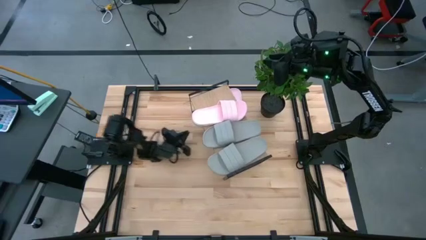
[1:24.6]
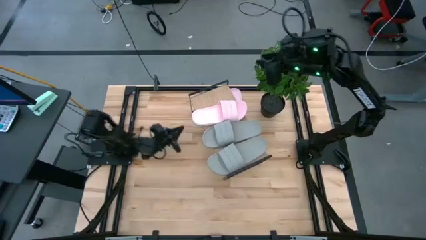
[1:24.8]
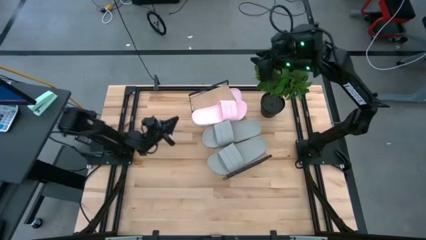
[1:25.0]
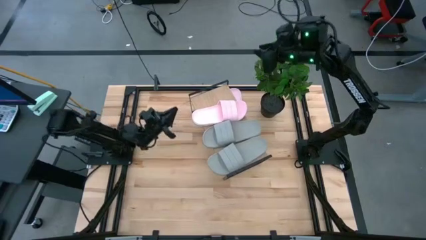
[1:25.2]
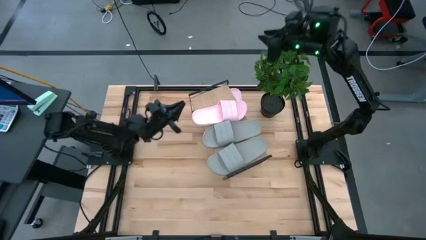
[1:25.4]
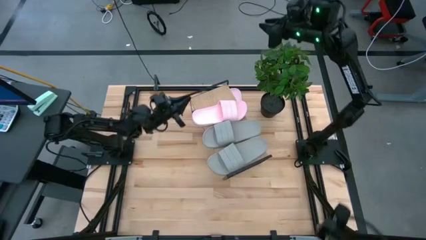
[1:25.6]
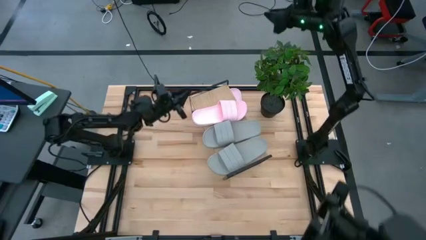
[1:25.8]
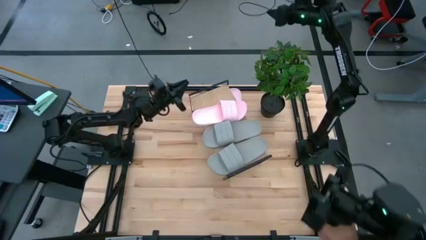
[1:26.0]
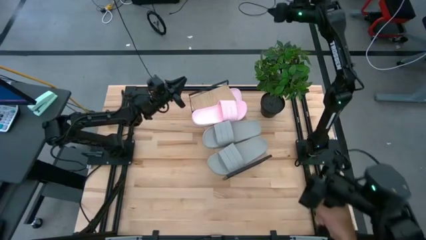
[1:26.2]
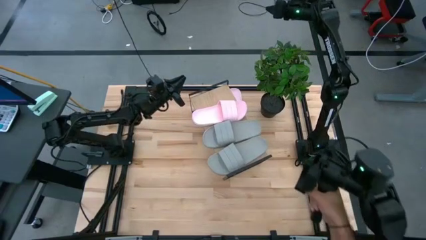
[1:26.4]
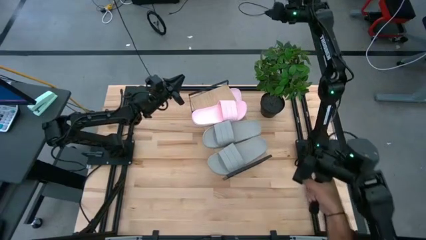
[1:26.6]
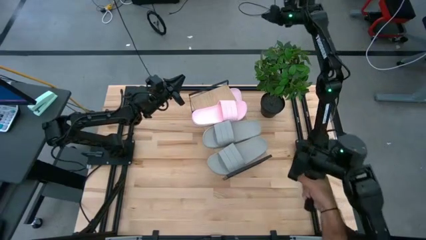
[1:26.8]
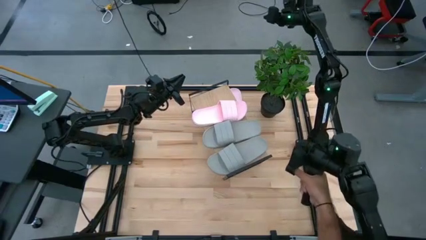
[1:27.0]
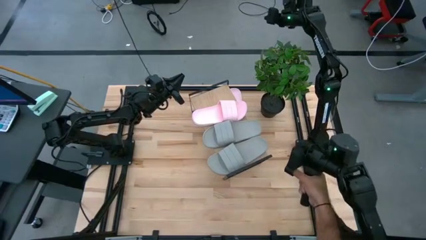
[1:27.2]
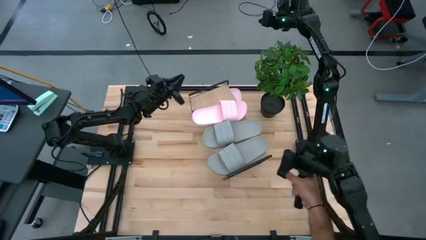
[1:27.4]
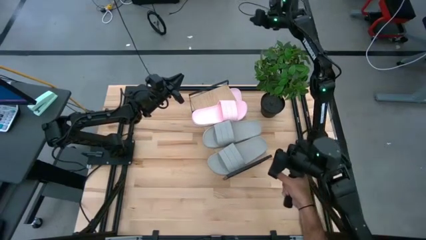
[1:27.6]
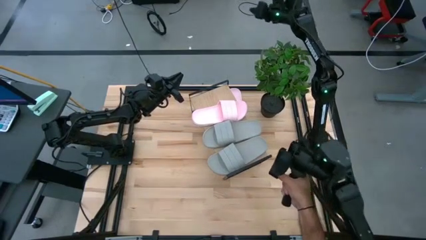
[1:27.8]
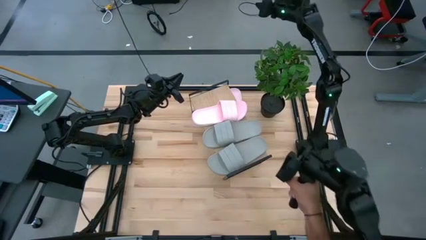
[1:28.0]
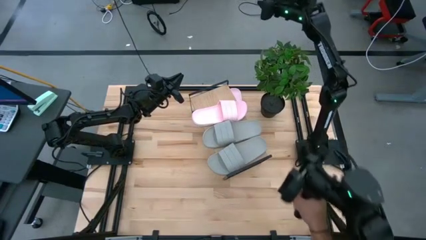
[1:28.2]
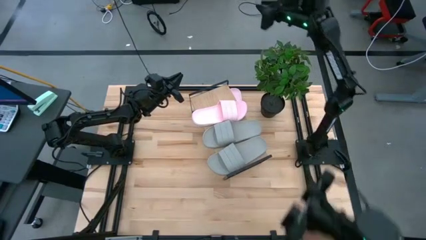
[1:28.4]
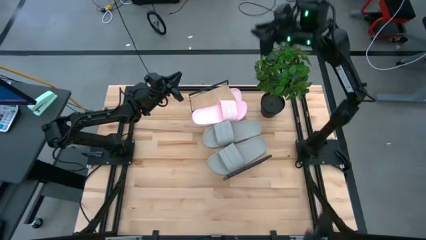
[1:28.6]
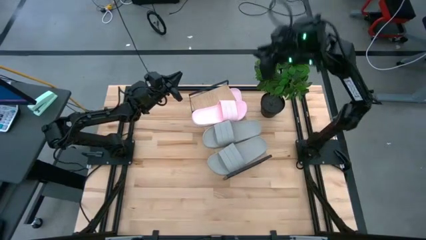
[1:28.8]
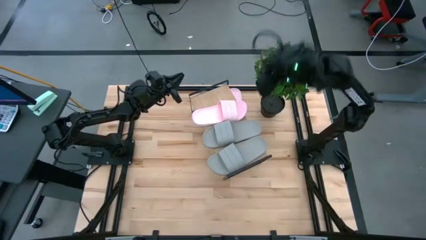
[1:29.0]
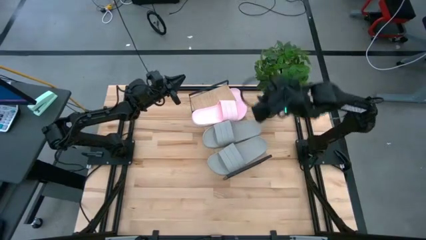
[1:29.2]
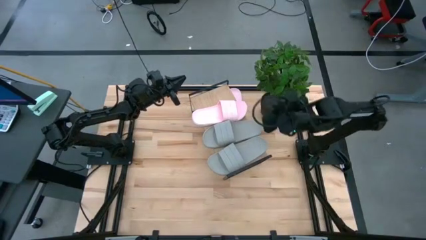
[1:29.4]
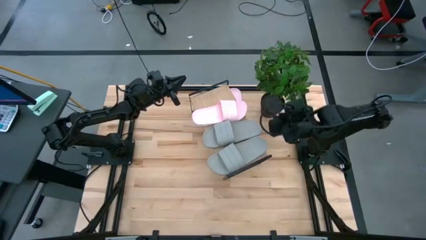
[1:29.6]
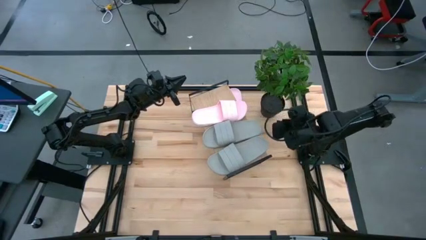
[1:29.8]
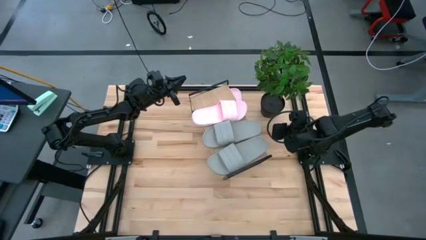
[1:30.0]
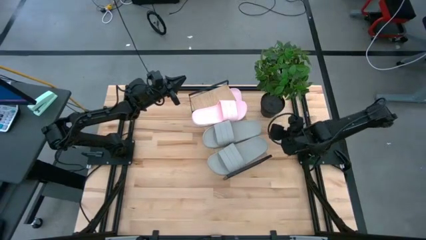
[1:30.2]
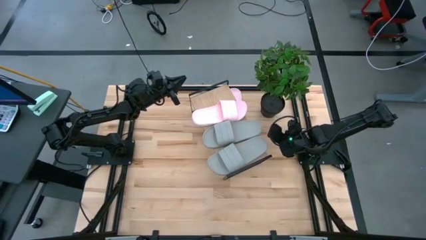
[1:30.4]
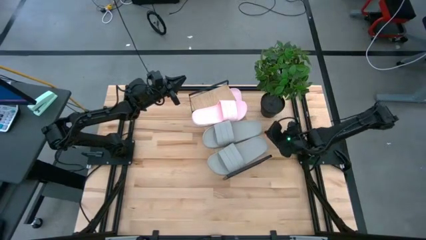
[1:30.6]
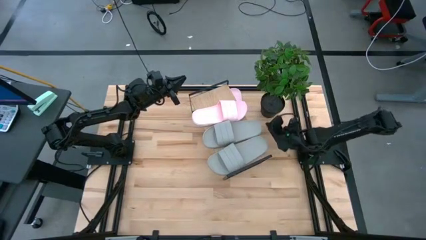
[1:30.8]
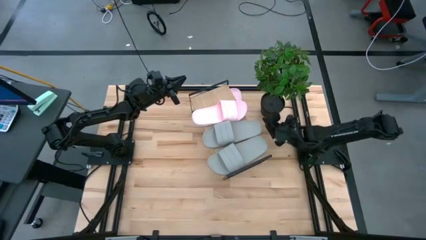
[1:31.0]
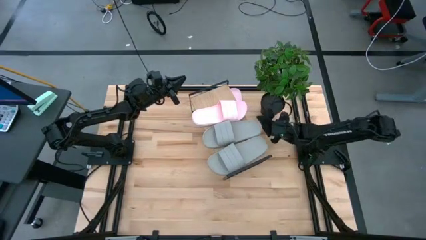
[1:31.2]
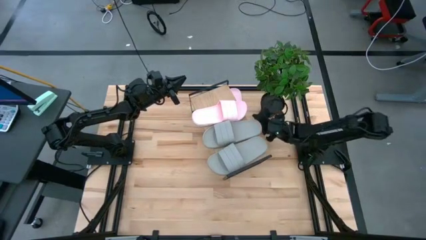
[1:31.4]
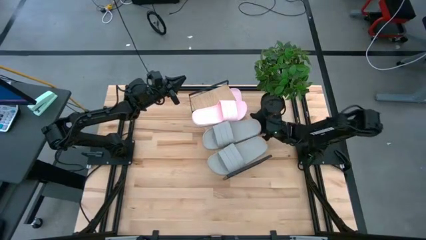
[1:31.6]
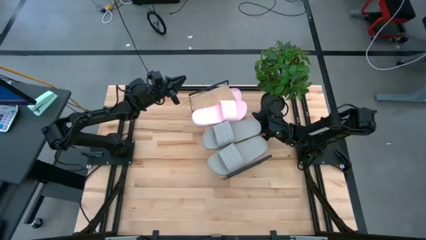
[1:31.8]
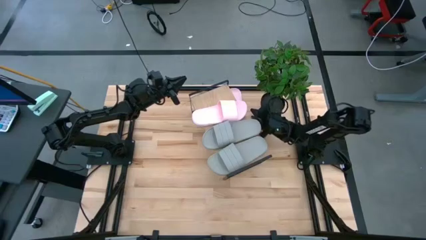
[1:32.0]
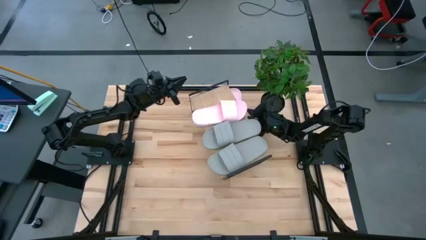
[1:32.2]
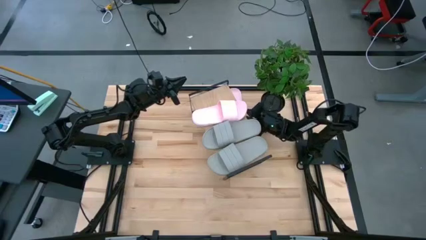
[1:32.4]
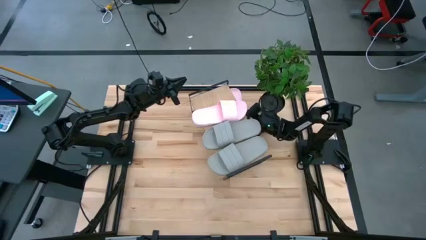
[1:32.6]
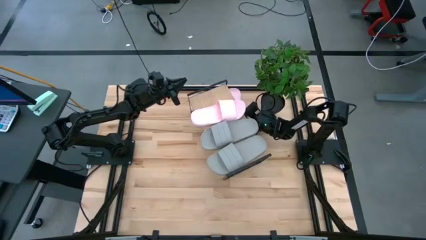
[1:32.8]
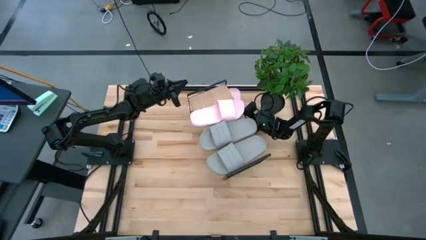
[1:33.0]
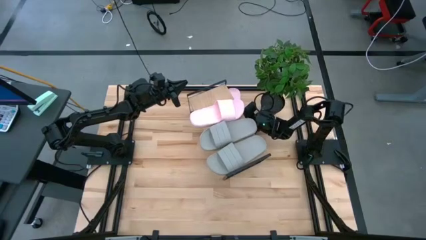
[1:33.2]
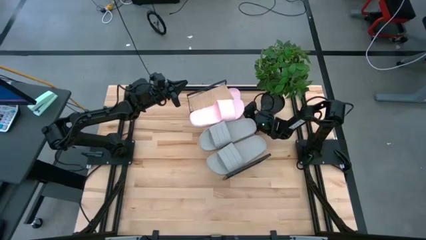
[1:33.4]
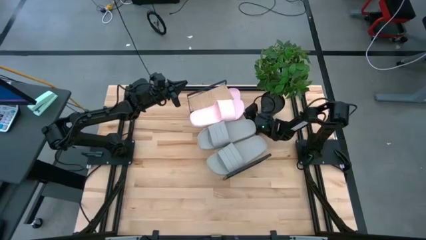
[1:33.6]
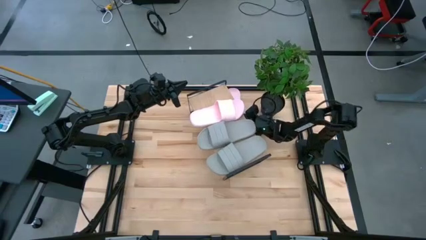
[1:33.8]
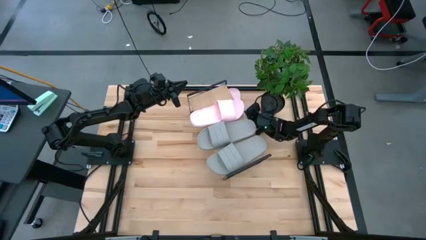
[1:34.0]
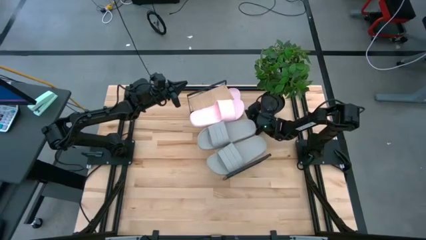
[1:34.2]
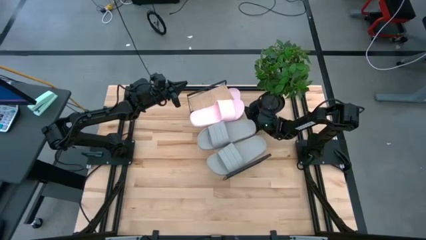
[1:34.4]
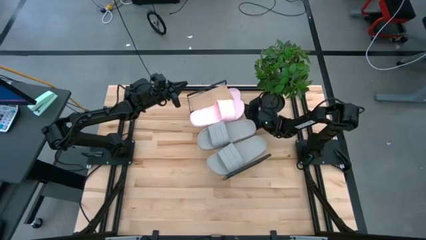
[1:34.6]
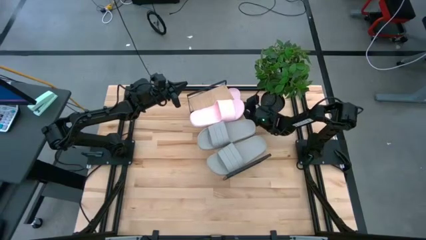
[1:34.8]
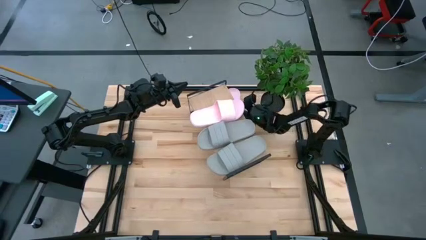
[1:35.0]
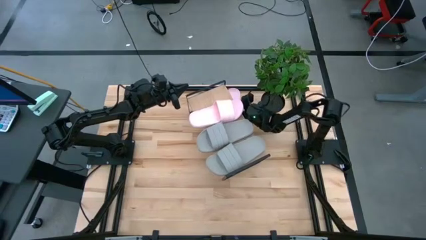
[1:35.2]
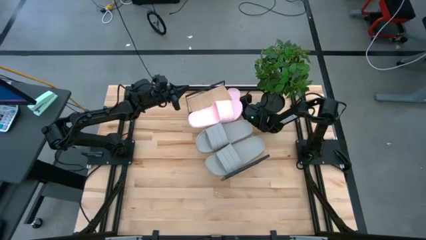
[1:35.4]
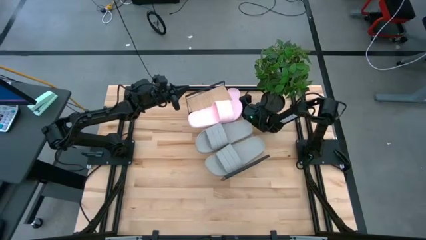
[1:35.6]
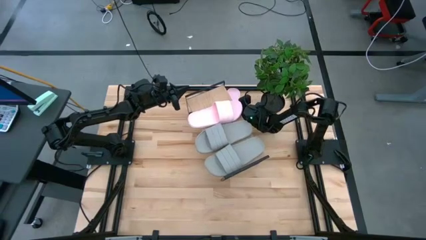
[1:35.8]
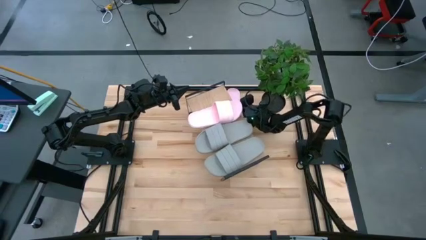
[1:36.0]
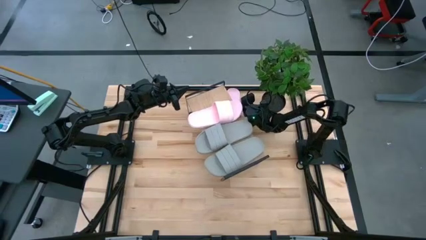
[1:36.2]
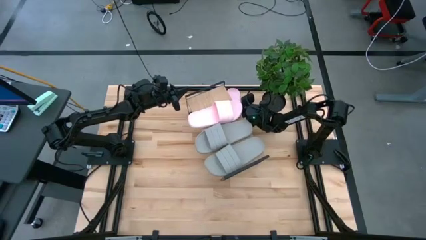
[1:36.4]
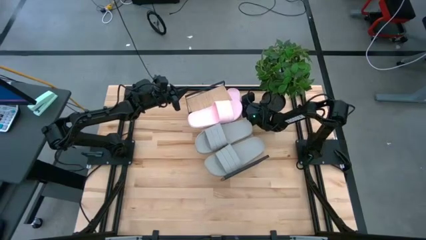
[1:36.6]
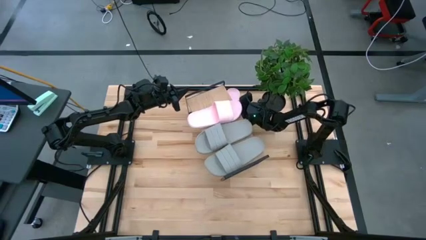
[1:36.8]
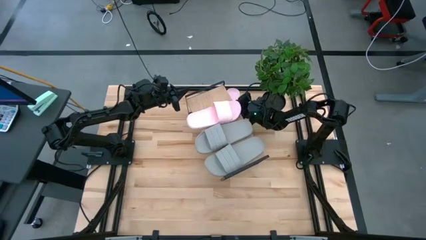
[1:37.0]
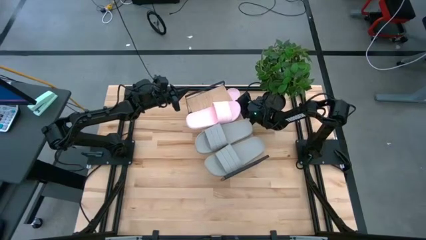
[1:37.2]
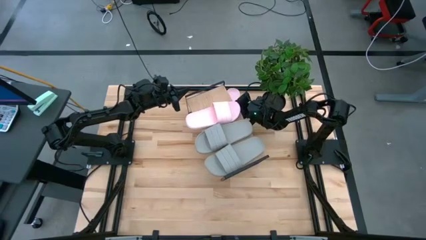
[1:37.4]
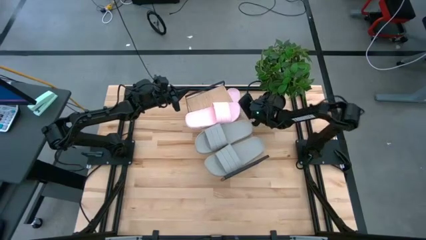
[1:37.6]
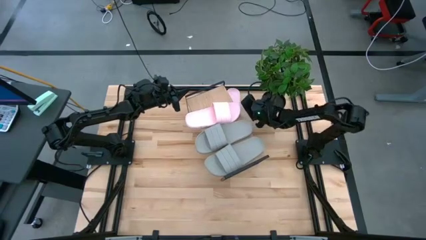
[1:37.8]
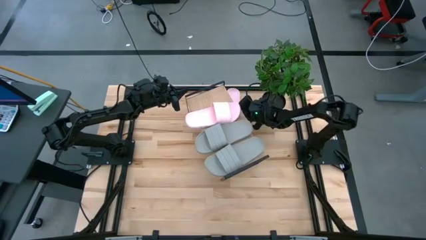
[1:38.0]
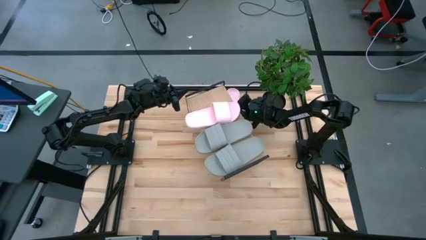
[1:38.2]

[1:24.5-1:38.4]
Task: Pick and place slides into the shelf
Put the pink slipper on the shelf

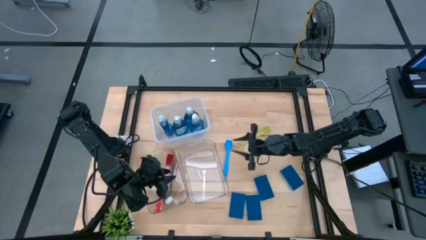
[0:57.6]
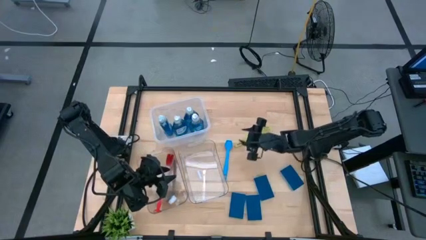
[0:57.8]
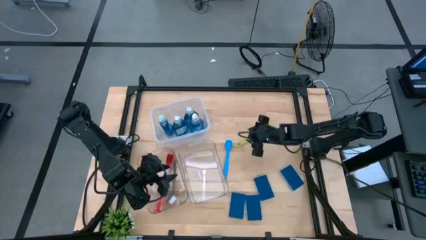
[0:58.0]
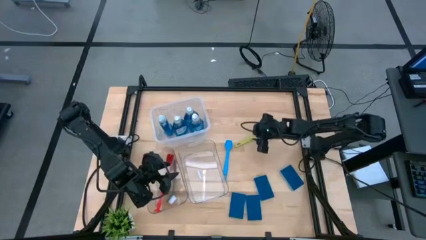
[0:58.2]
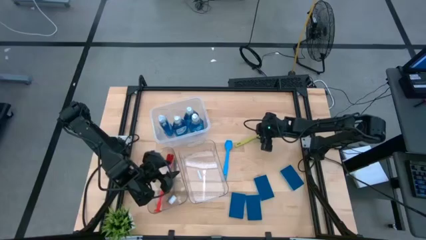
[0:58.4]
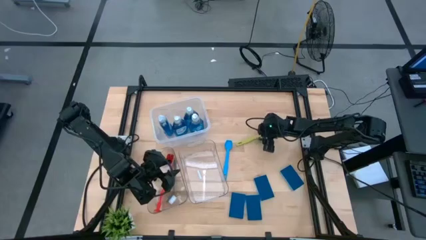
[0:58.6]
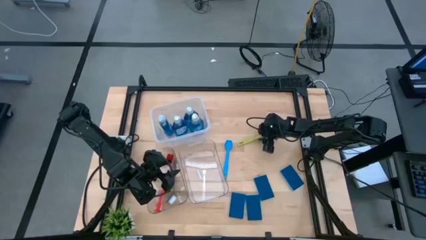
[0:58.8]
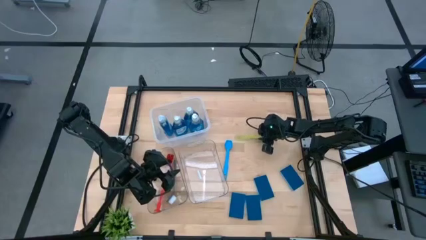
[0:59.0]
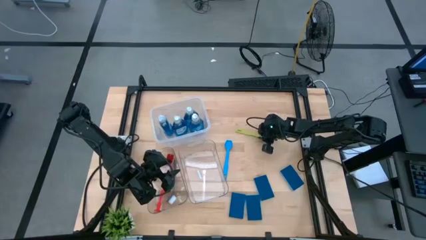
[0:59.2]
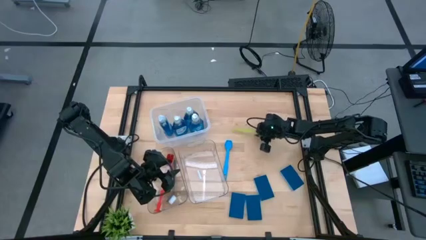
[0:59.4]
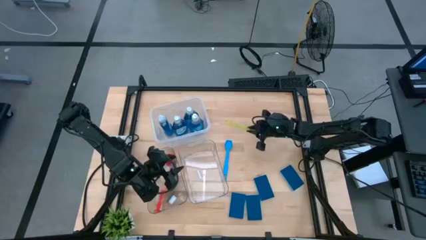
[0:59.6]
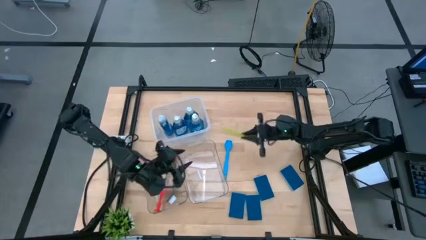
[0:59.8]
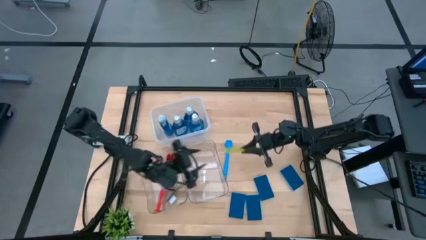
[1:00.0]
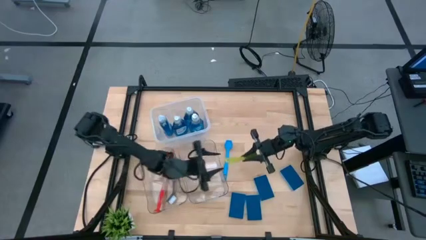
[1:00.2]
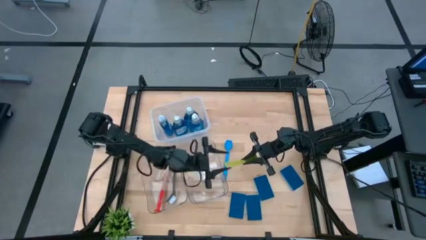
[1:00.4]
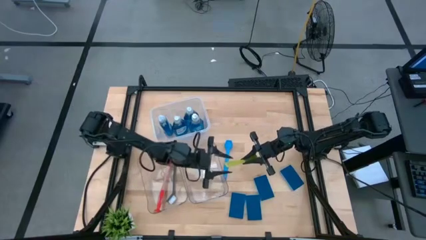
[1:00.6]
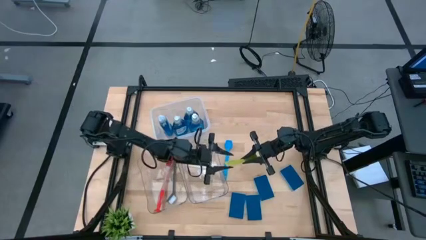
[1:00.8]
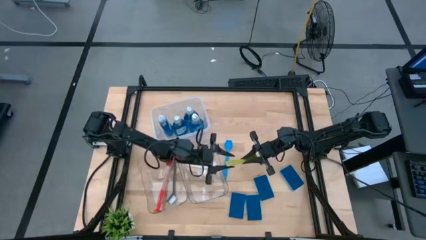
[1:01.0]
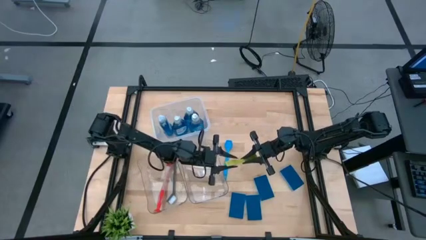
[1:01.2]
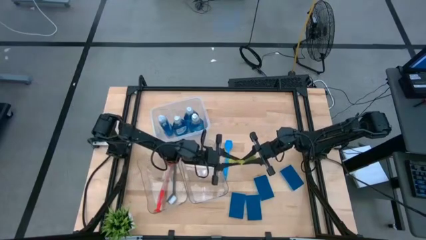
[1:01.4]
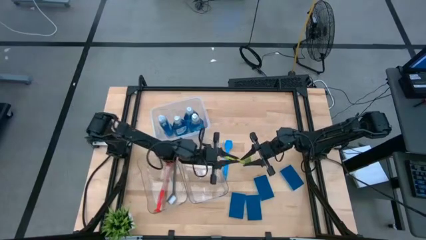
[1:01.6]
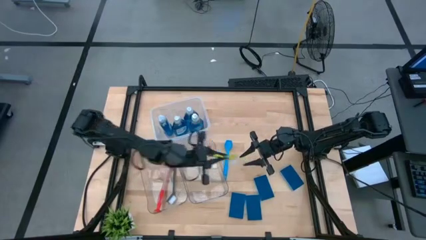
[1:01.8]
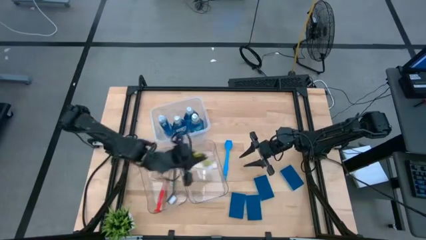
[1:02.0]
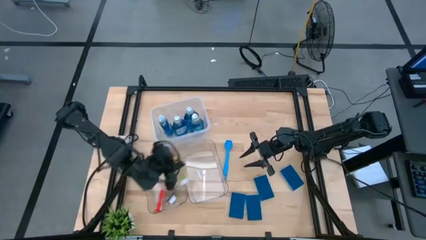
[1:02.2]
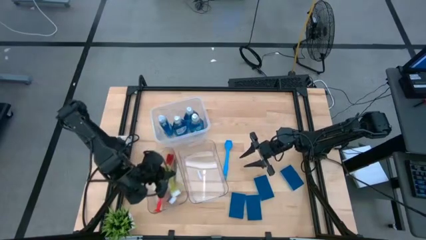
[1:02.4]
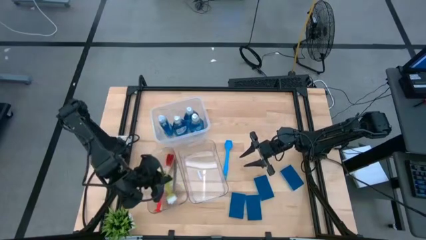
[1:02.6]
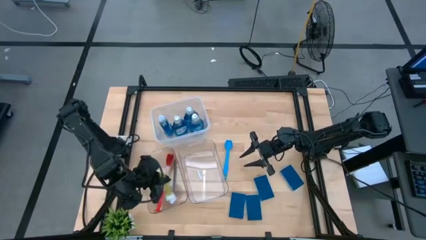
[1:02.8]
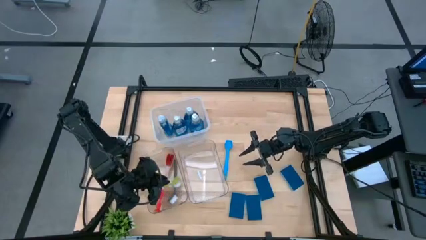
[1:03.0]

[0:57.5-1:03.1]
Task: Pick & Place Kitchen Sink Supplies
Put the green dishwashing brush into the left transparent bin
